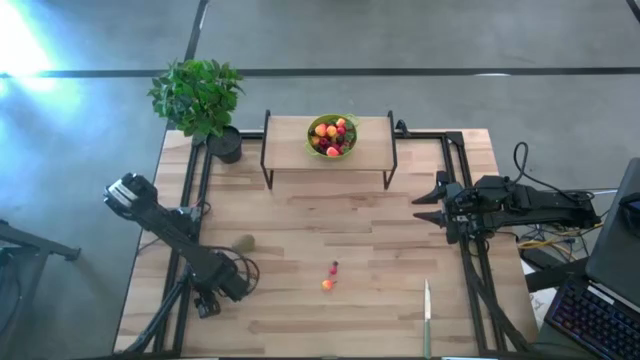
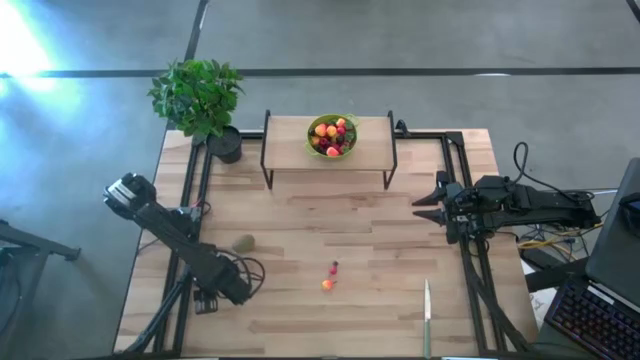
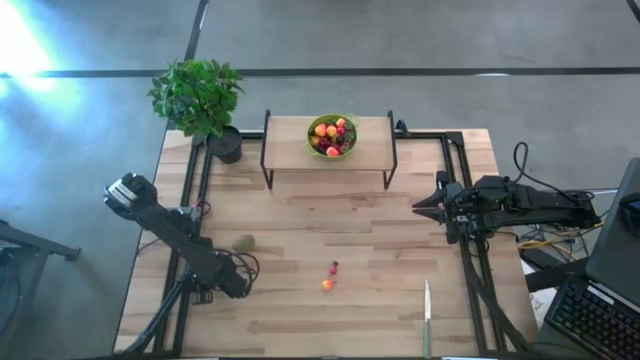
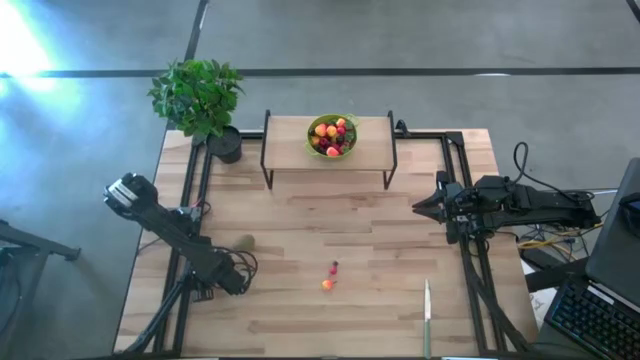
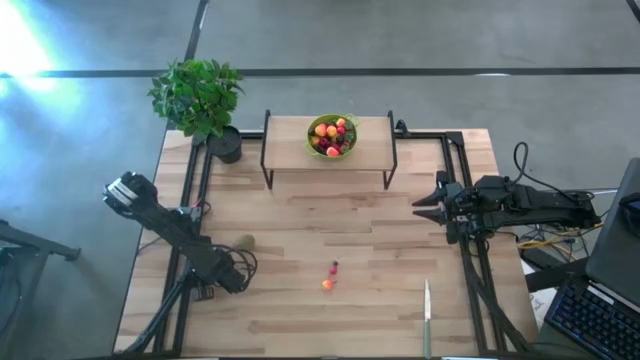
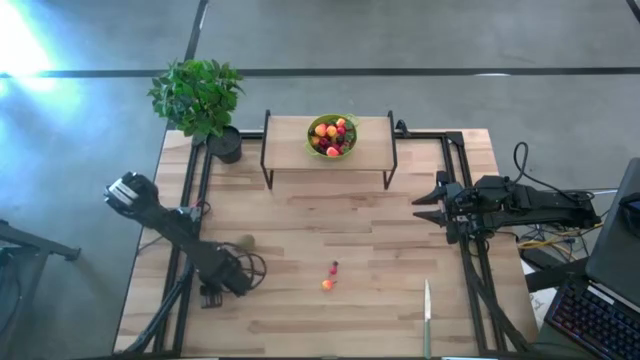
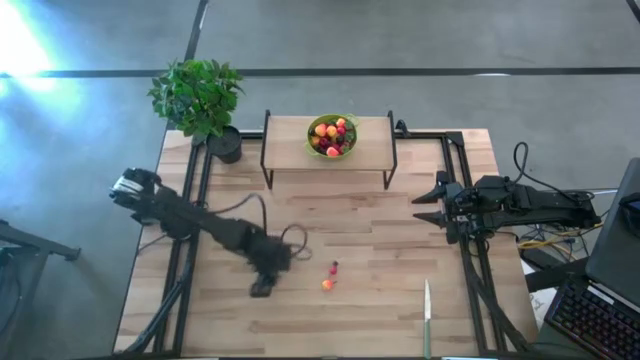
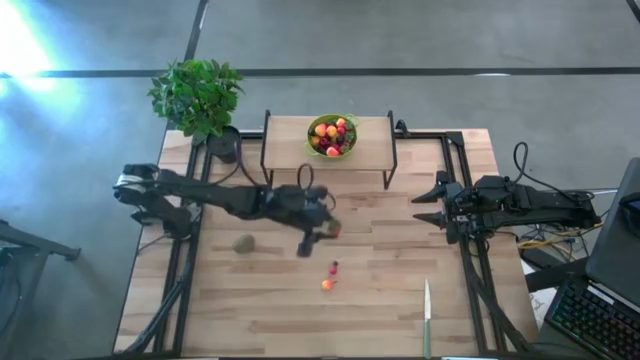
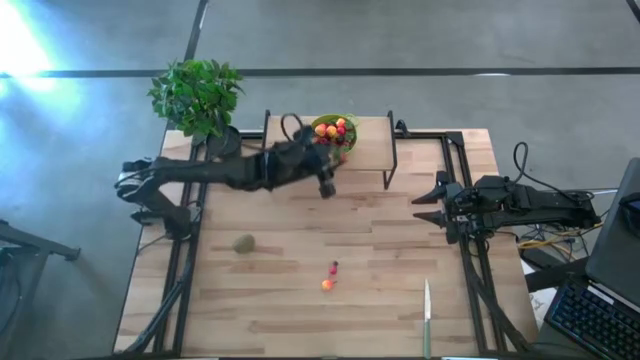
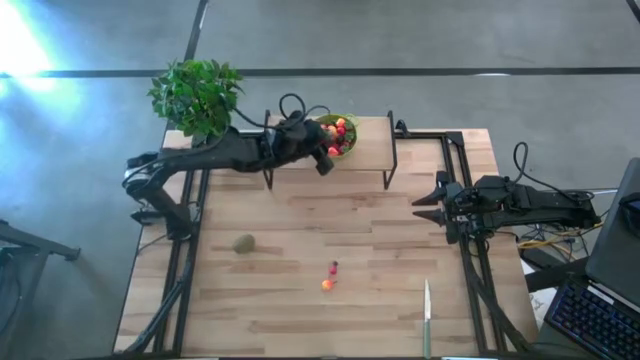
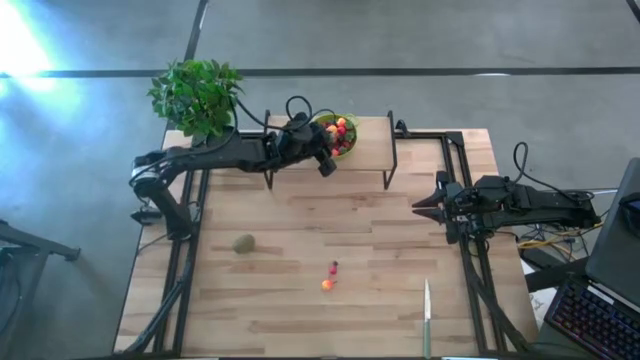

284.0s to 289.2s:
Task: Pick & Place Fruit
Put the red strawberry into the green strainer bowl on the shelf

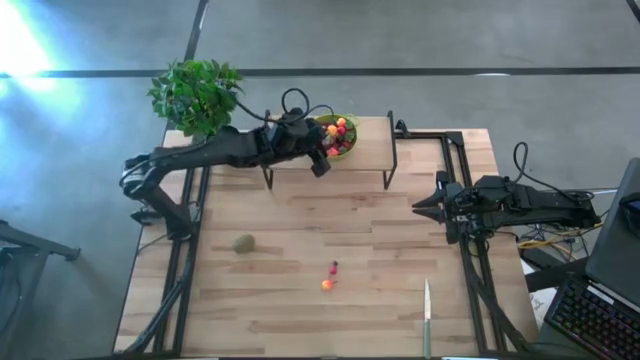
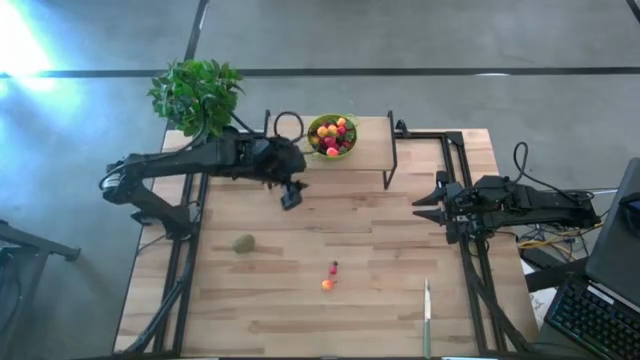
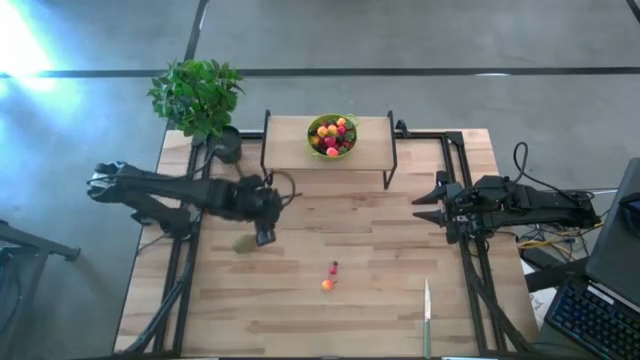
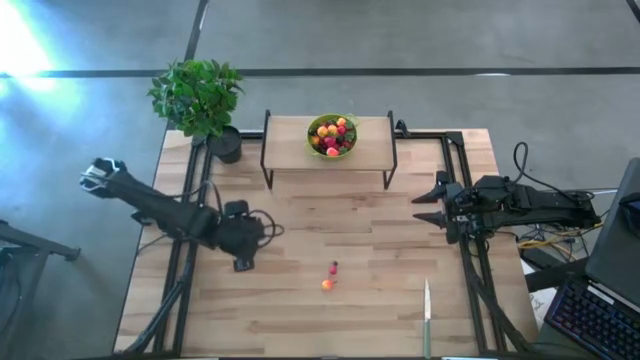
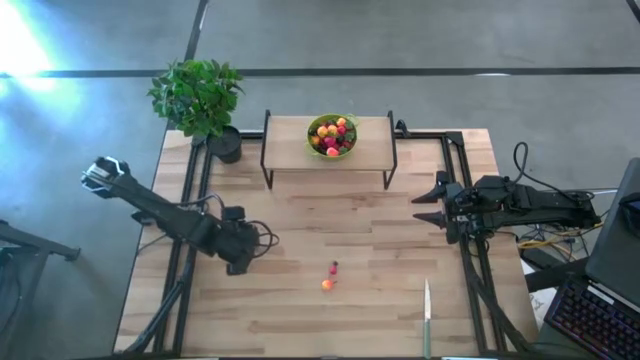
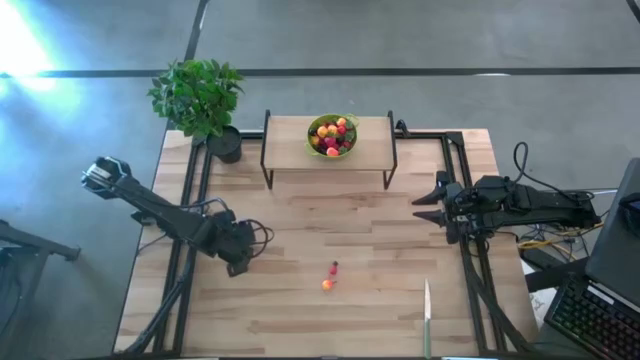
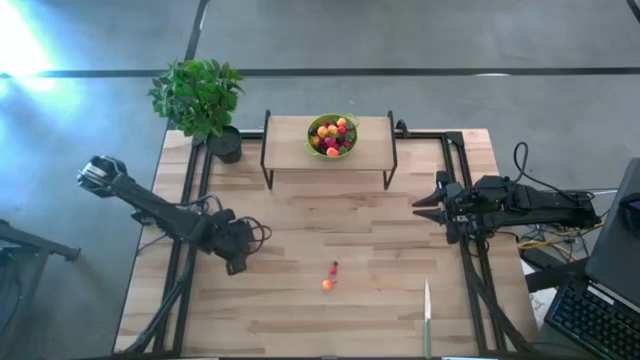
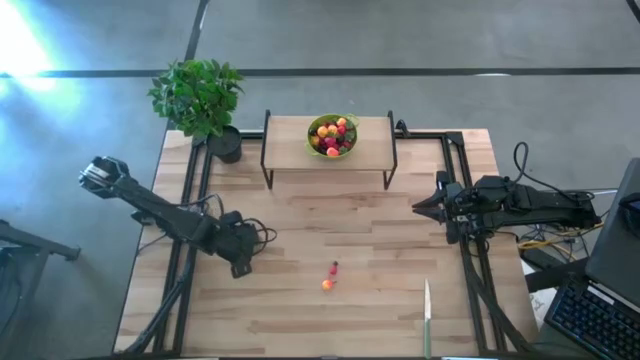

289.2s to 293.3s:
Put the brown kiwi into the green strainer bowl on the shelf

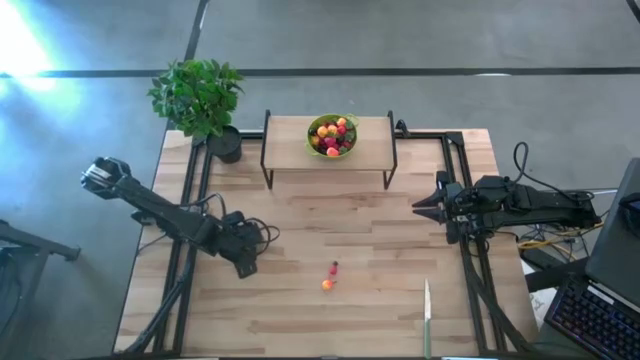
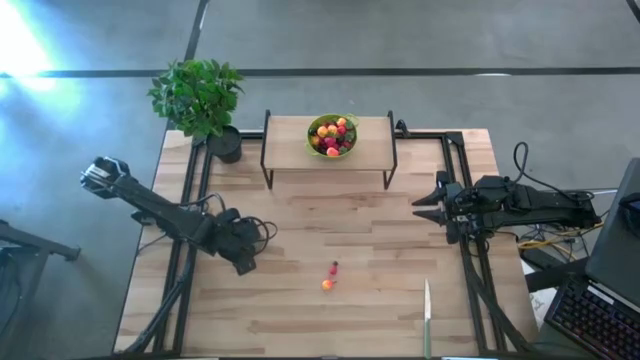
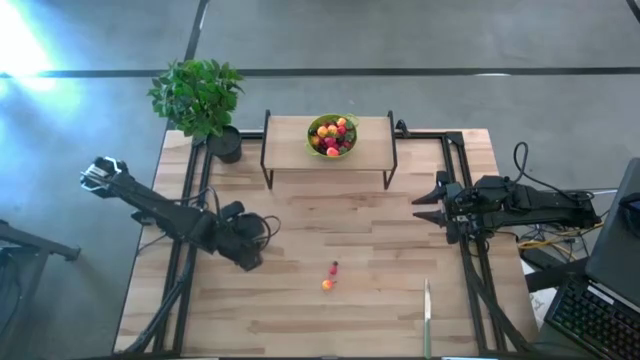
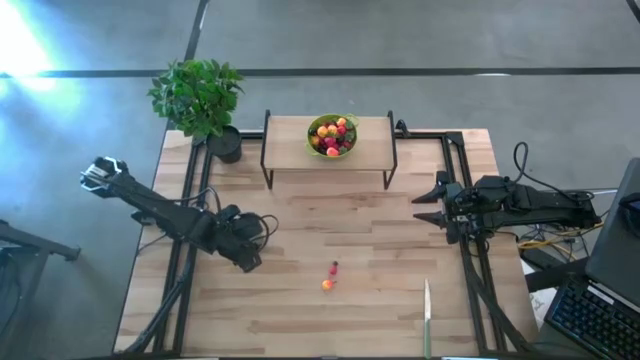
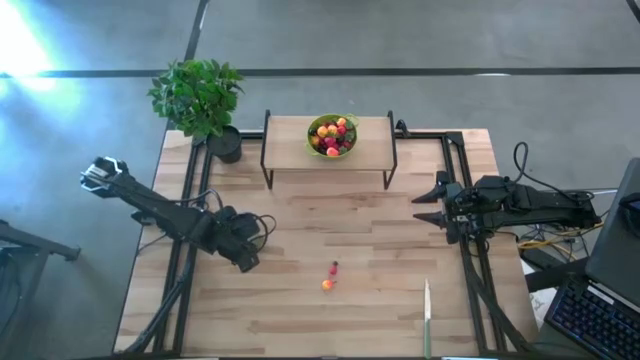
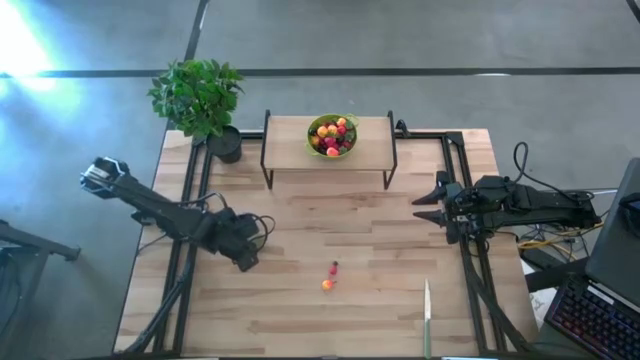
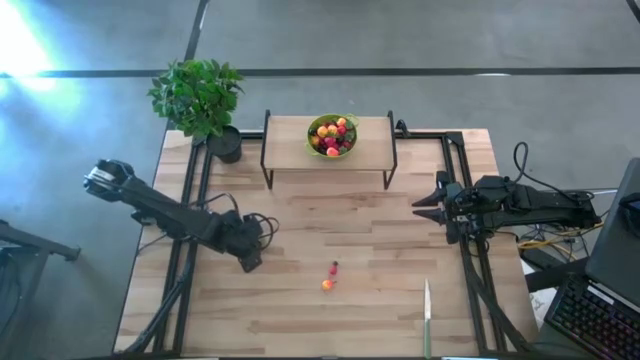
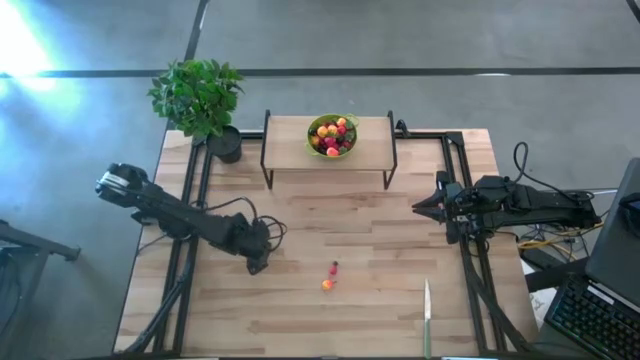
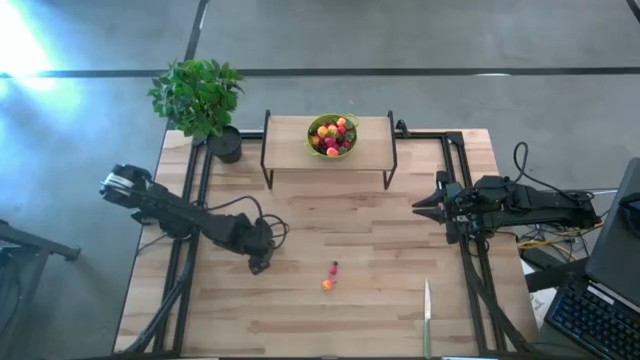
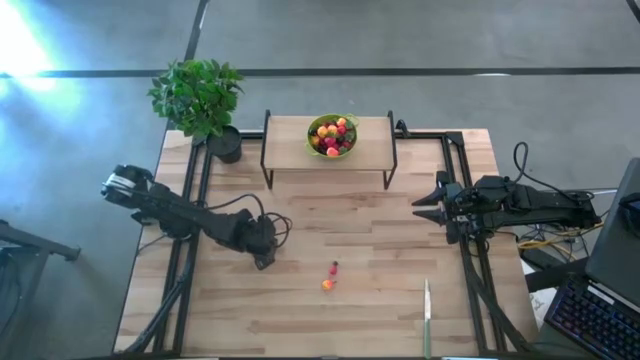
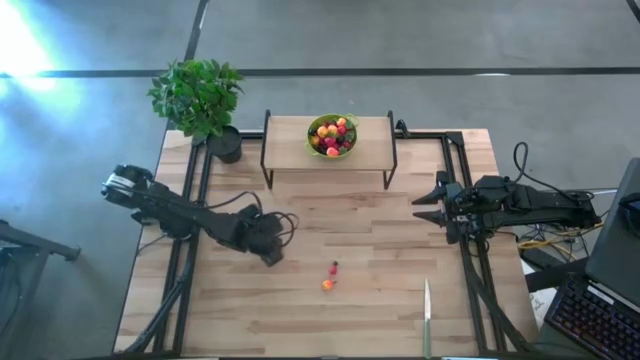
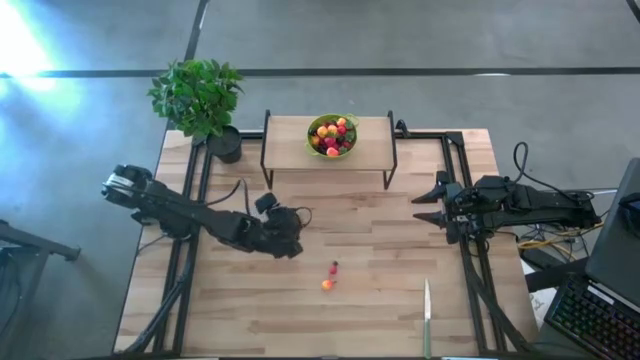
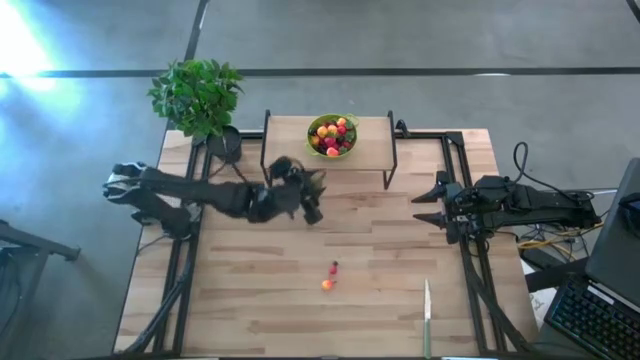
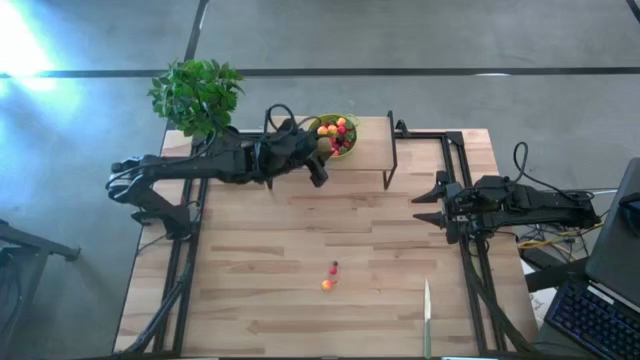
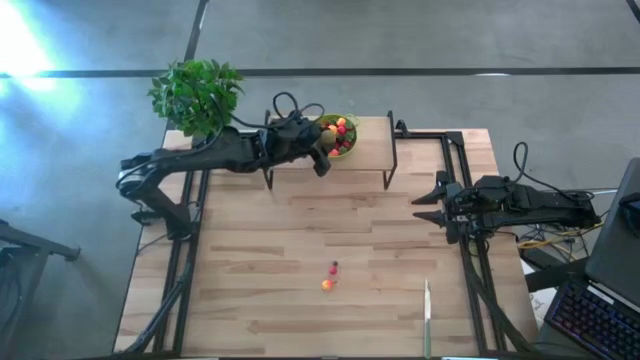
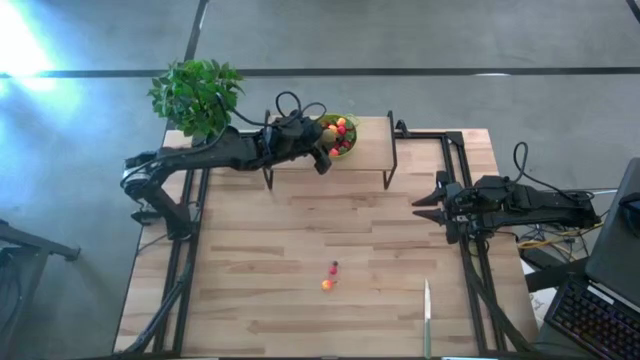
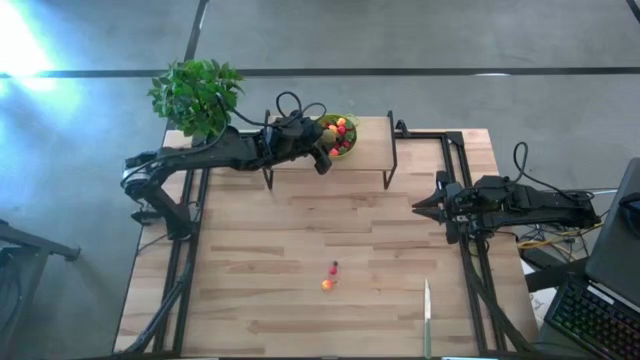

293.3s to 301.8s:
Put the brown kiwi into the green strainer bowl on the shelf

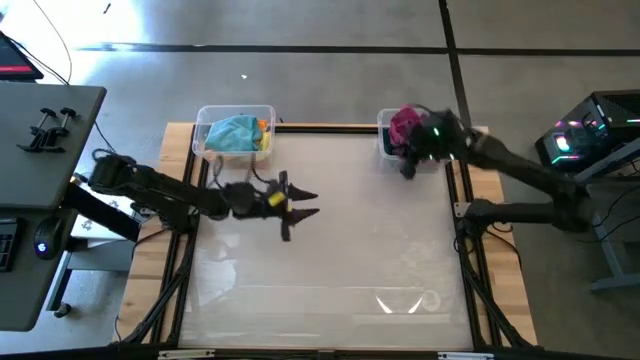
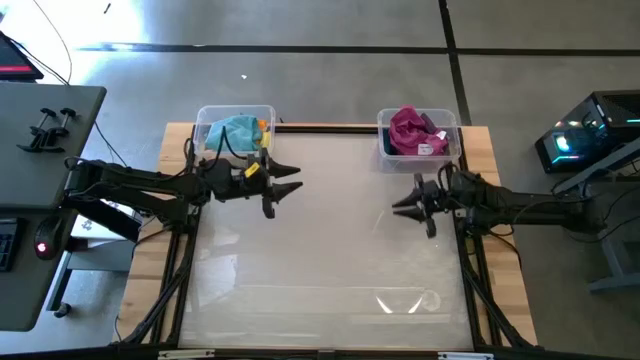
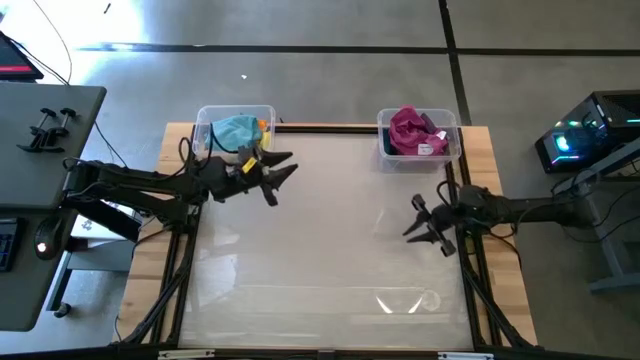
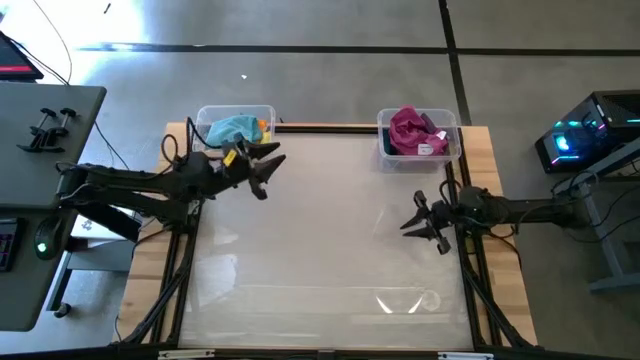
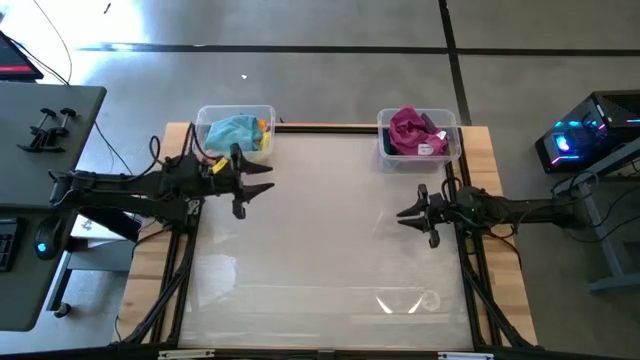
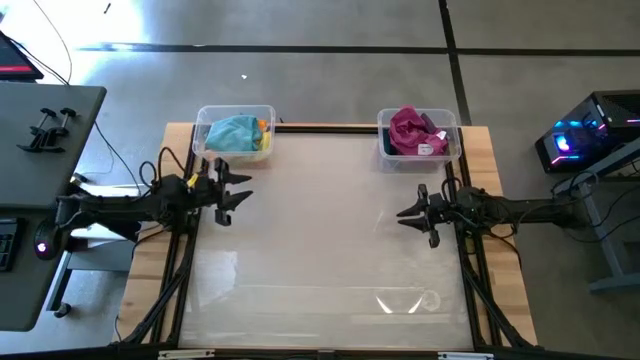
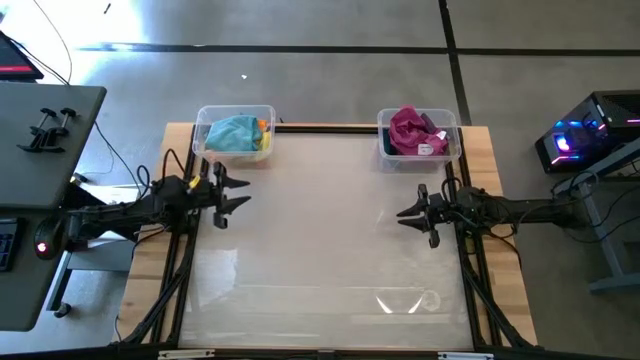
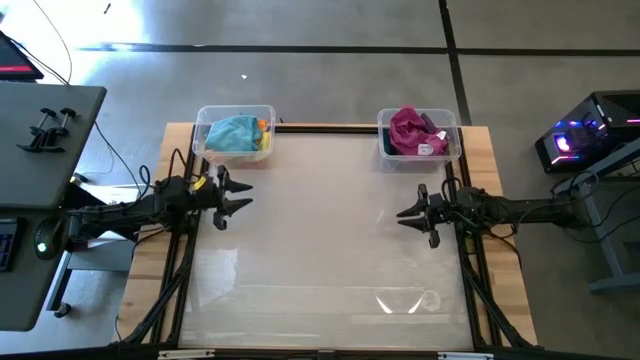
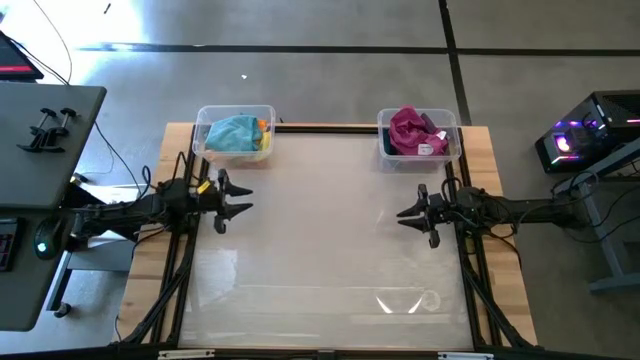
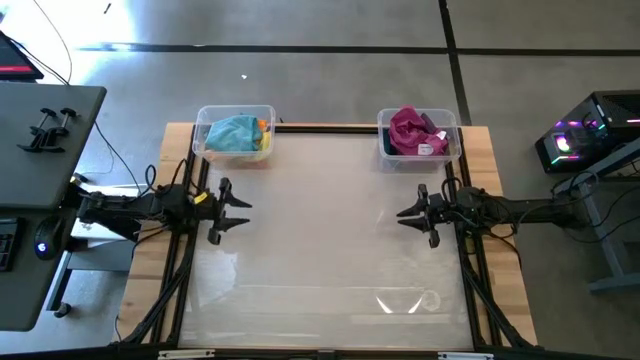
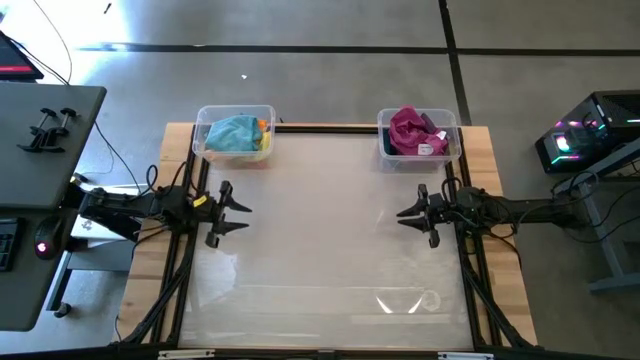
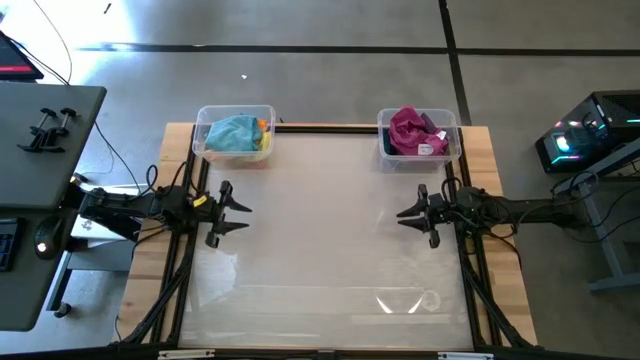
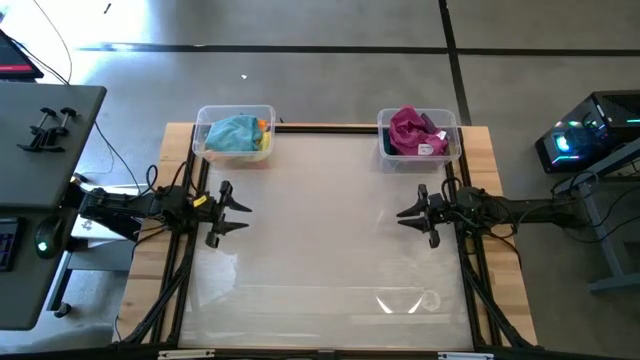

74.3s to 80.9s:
Task: Sort towels by color in basket
Return to Home Position
